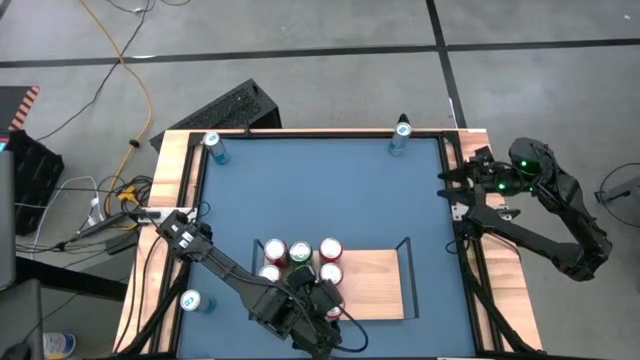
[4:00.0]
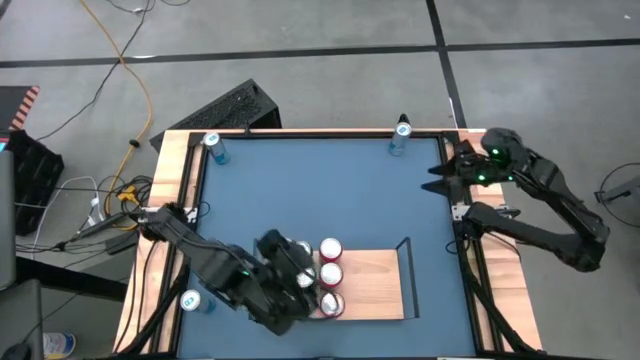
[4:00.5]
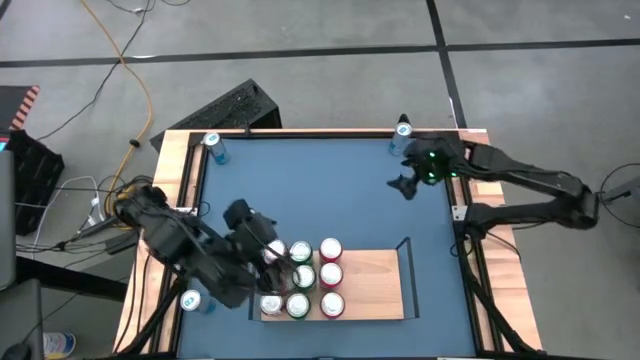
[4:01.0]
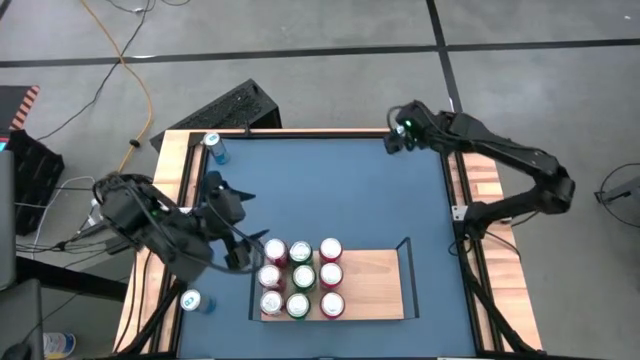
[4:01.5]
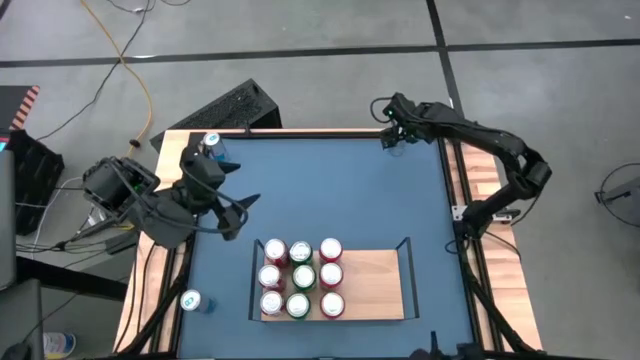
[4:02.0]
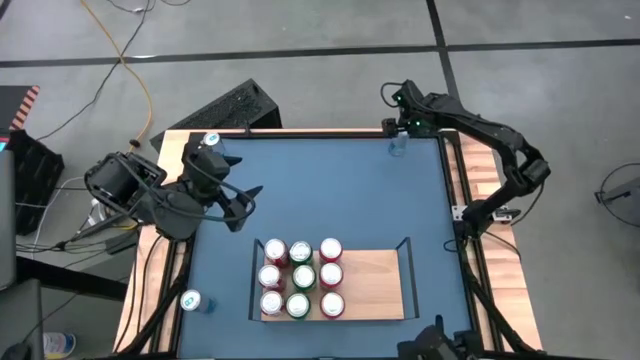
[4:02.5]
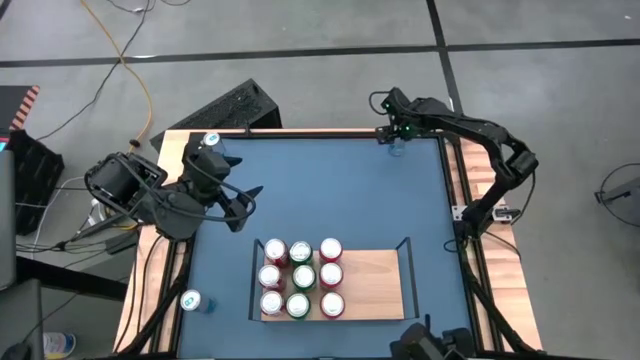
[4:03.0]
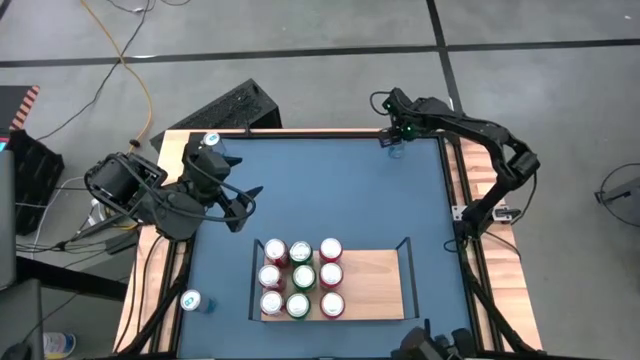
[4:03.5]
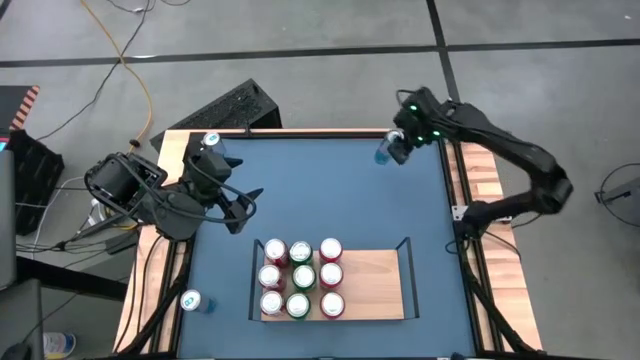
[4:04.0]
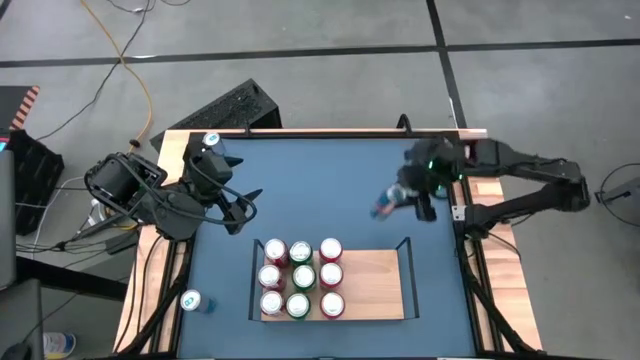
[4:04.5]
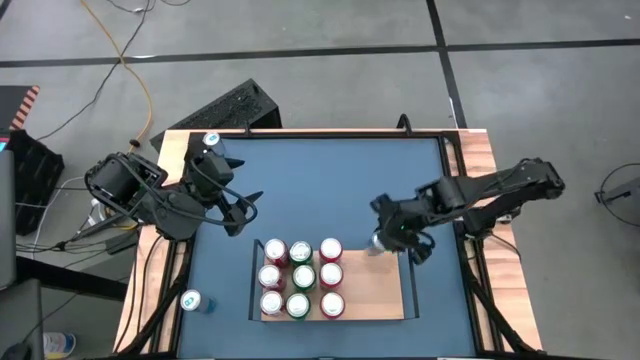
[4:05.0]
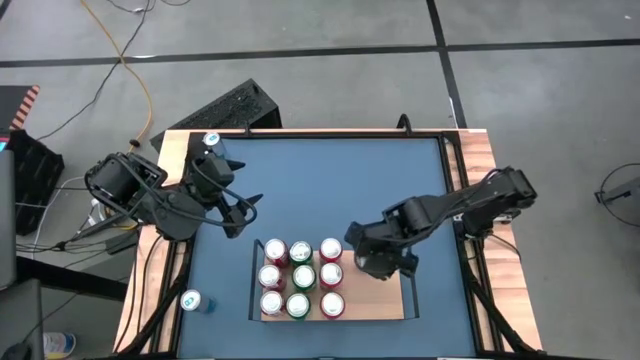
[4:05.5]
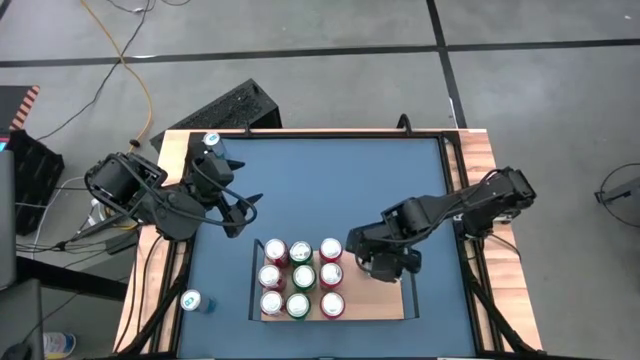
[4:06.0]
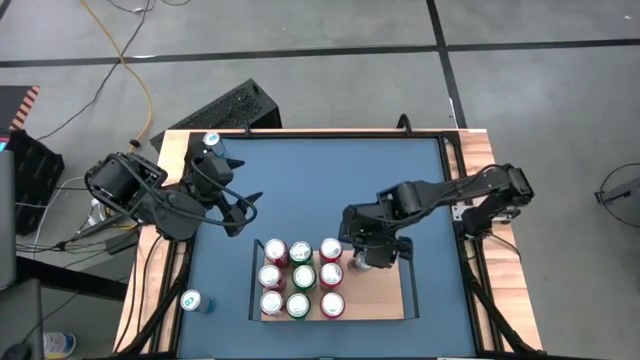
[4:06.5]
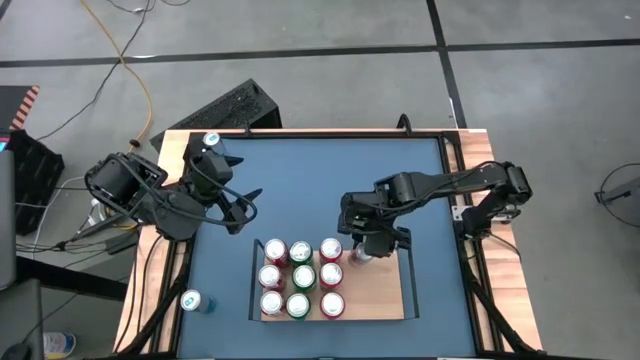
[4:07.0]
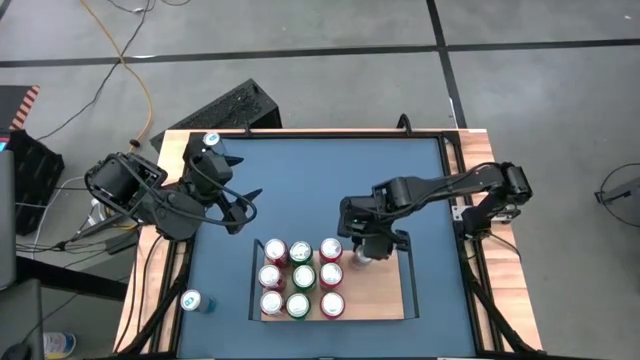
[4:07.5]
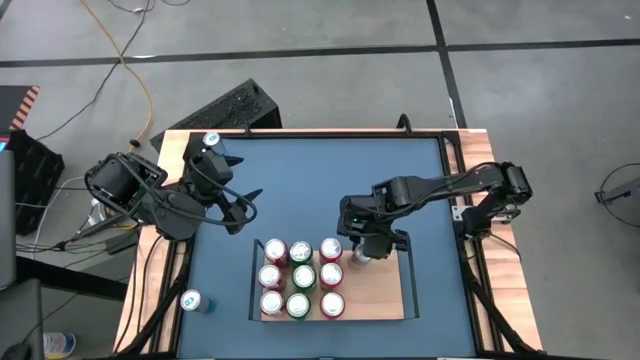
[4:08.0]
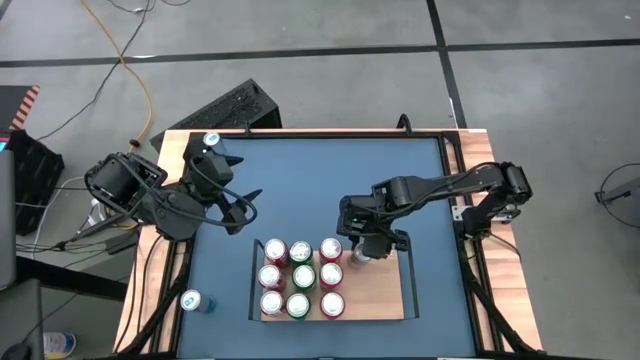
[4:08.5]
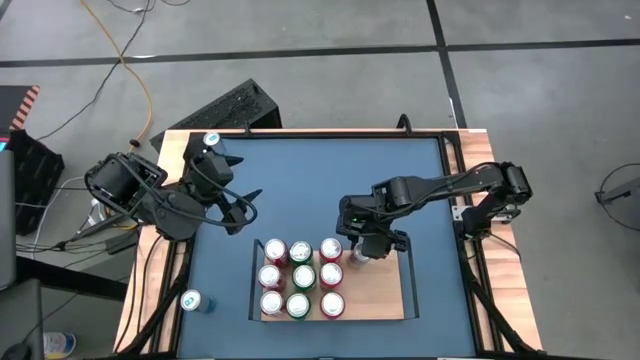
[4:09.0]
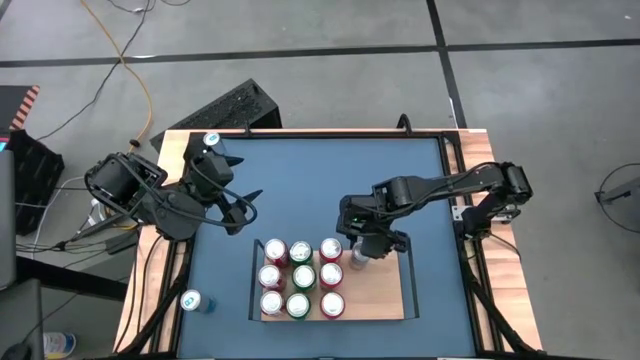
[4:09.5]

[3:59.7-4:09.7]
Task: Place canned beverage on shelf
Put the top right blue soda can on the shelf aligned with the other left orange soda can

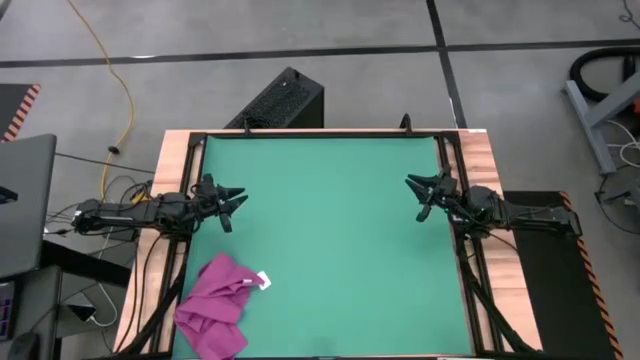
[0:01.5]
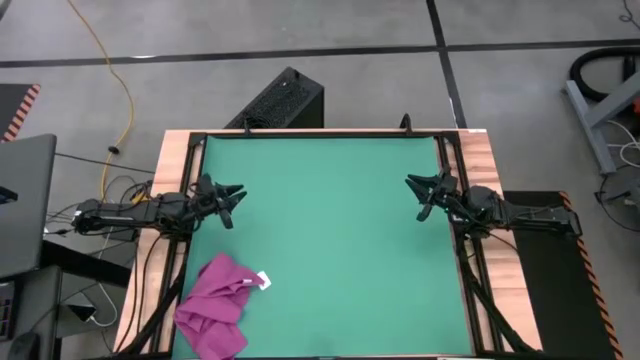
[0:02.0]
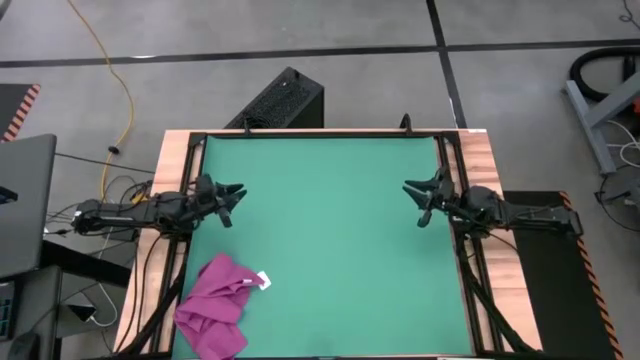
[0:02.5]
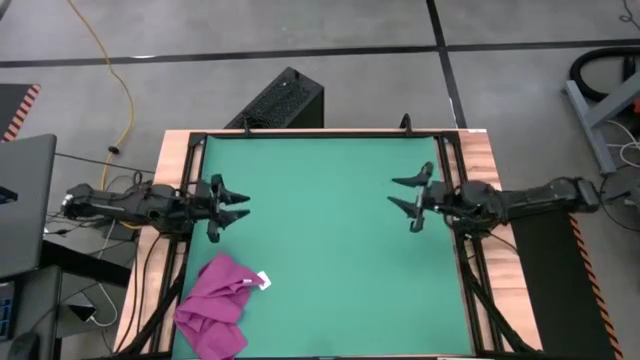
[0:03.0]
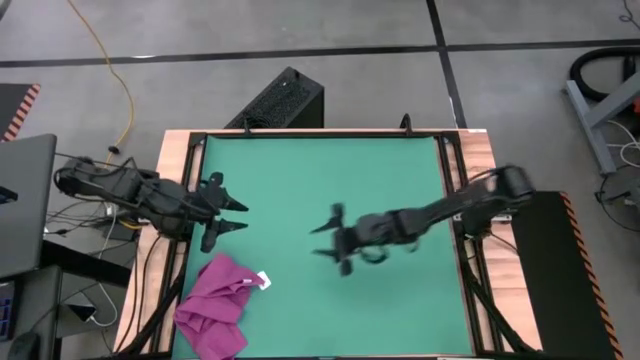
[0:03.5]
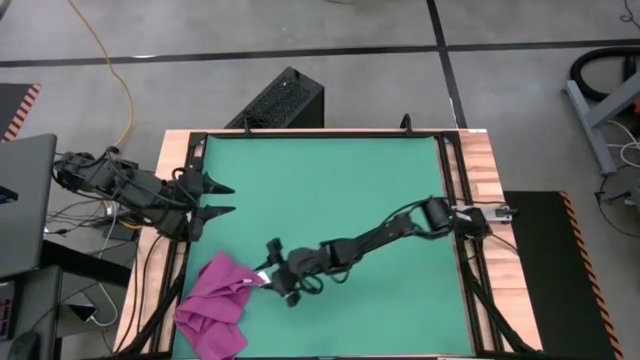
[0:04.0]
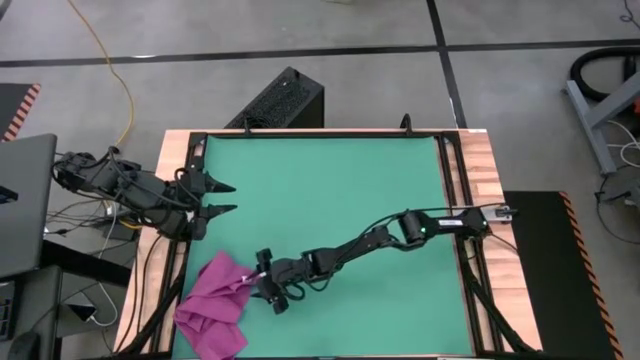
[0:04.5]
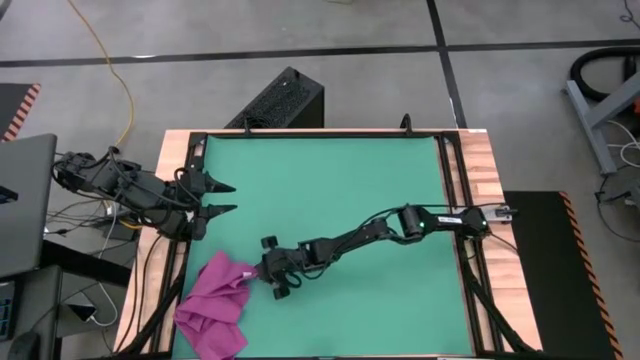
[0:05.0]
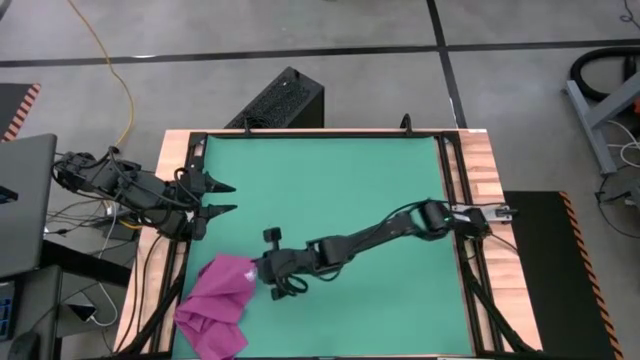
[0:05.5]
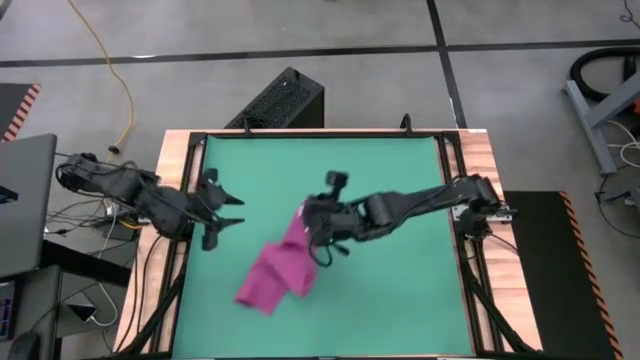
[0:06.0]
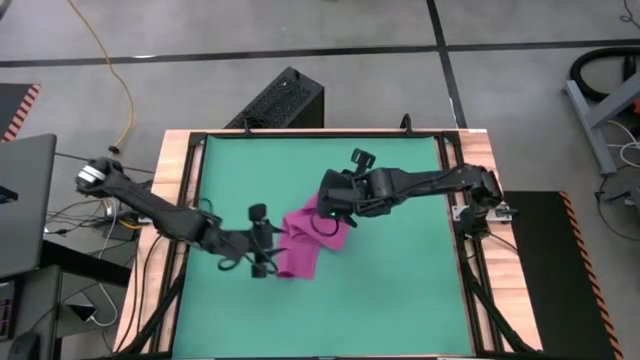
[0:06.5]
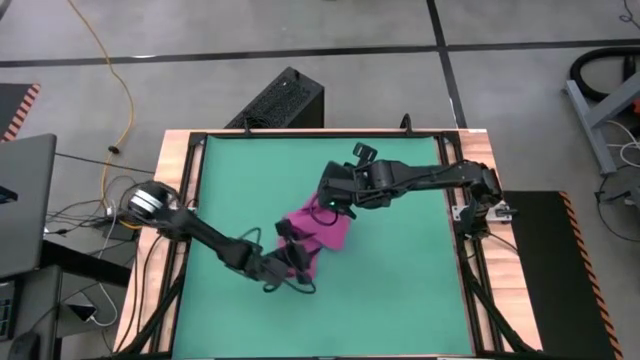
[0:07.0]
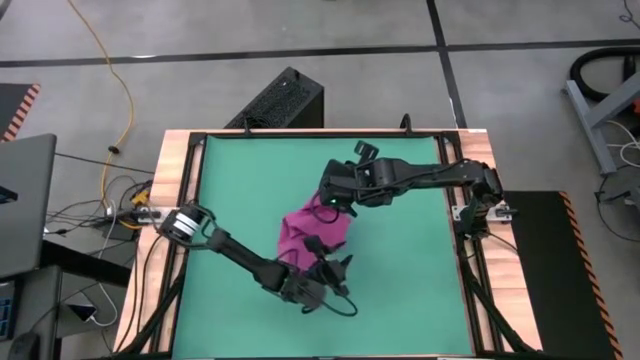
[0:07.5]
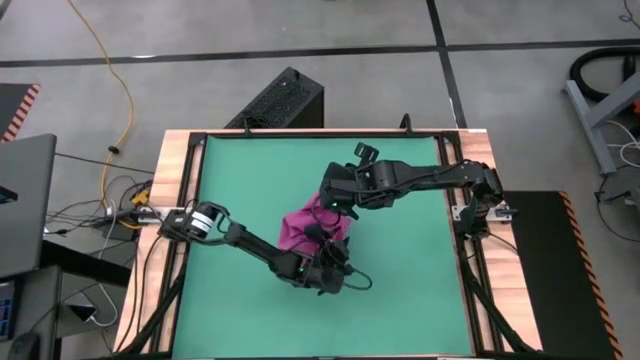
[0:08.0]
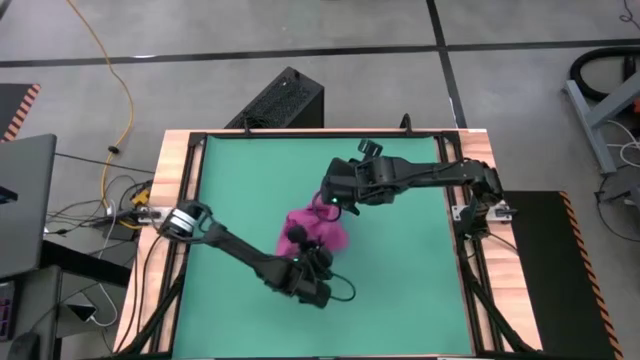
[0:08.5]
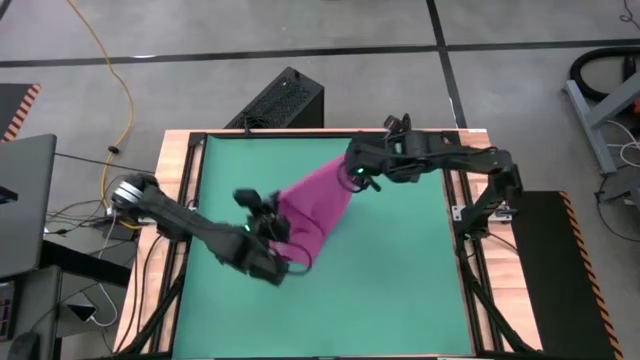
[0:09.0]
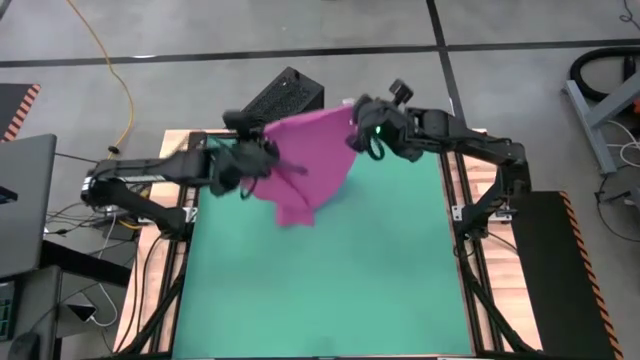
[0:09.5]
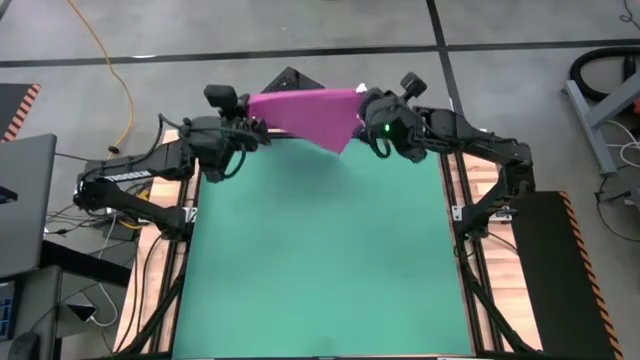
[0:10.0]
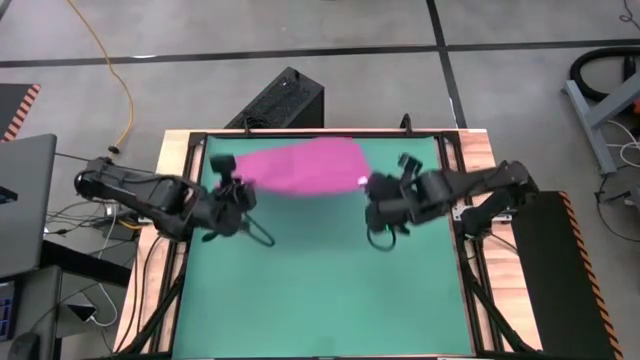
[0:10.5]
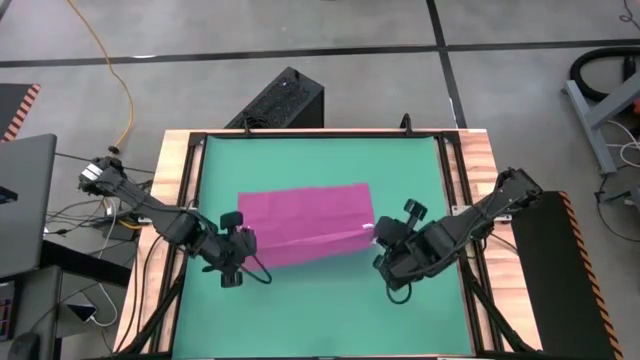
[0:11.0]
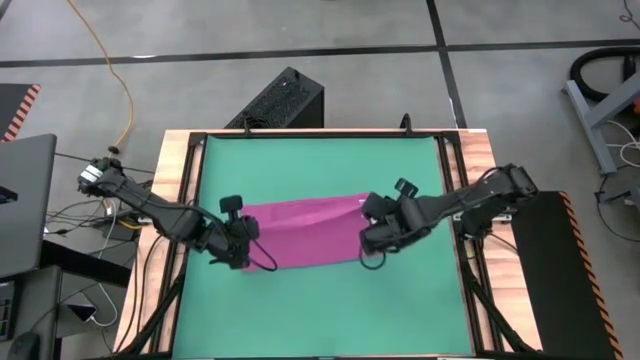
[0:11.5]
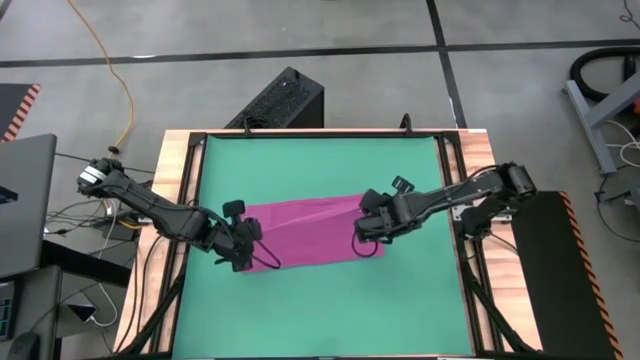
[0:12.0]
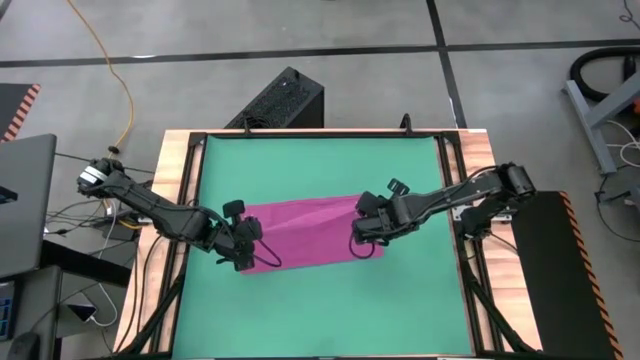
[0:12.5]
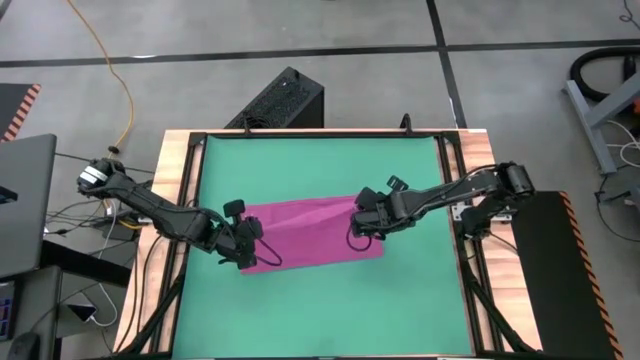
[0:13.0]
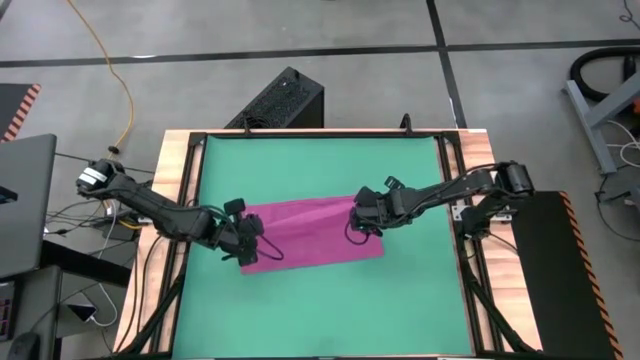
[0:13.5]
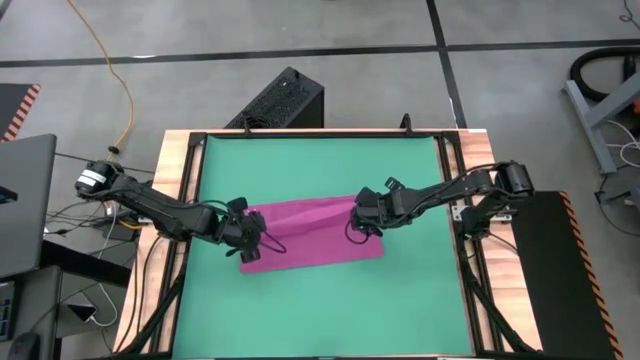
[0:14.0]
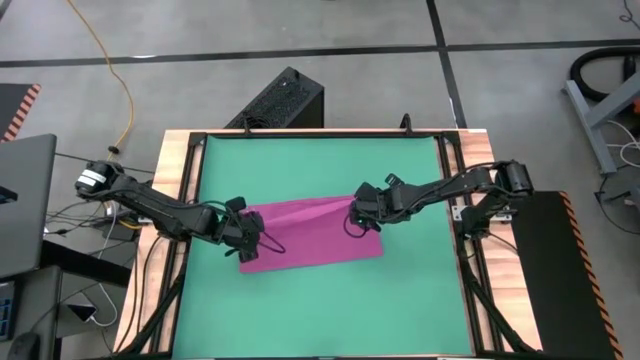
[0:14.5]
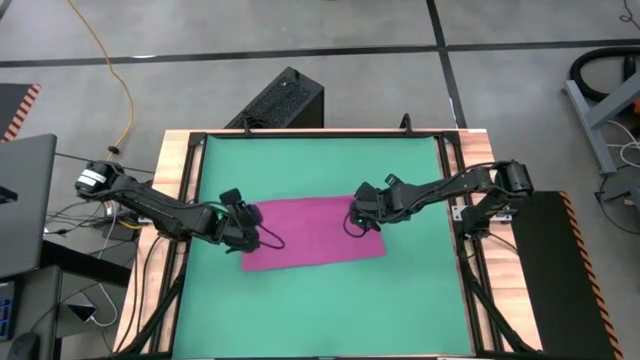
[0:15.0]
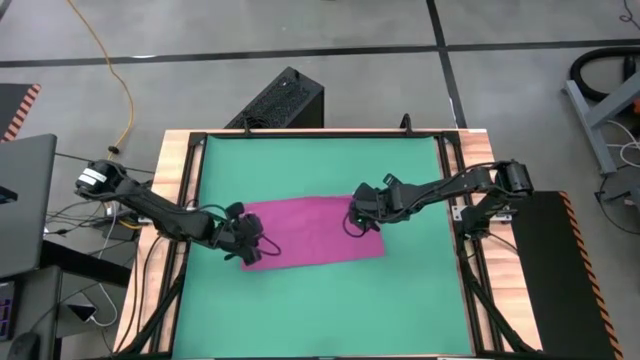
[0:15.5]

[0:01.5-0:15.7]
Task: Roll towel
Fold the violet towel
